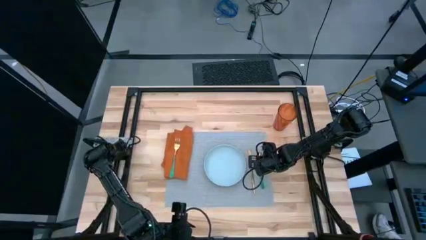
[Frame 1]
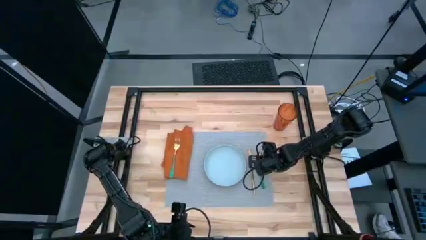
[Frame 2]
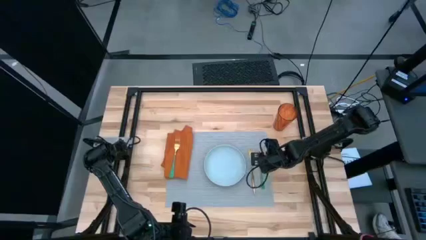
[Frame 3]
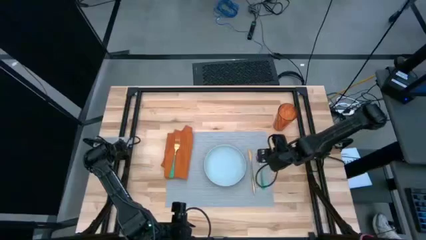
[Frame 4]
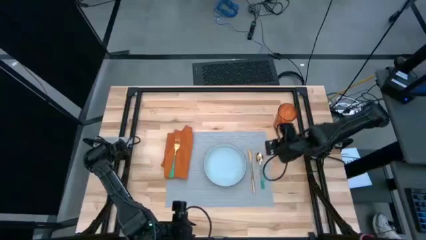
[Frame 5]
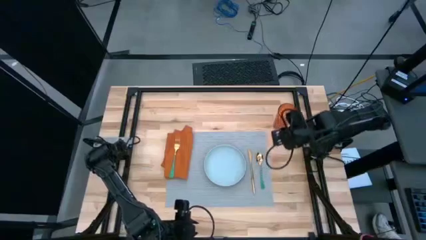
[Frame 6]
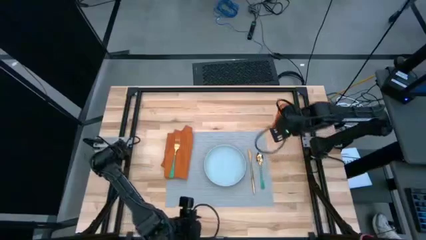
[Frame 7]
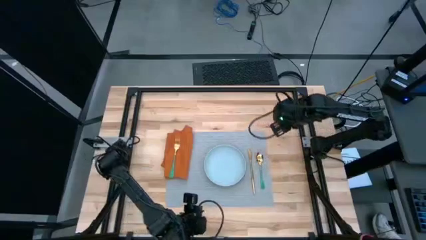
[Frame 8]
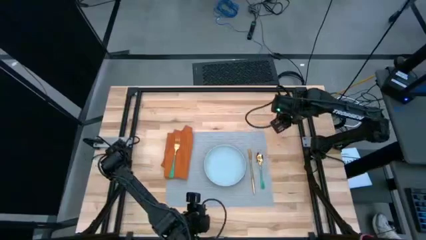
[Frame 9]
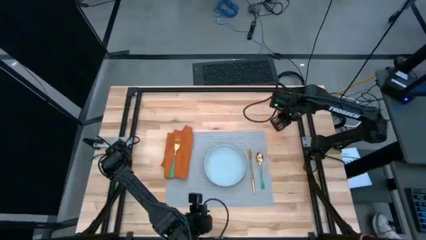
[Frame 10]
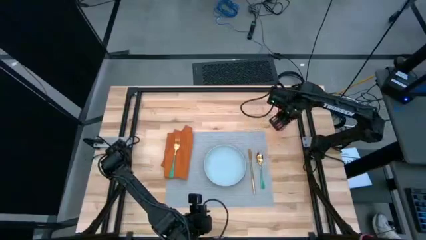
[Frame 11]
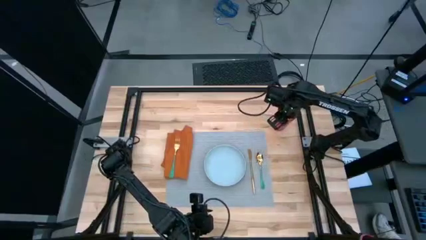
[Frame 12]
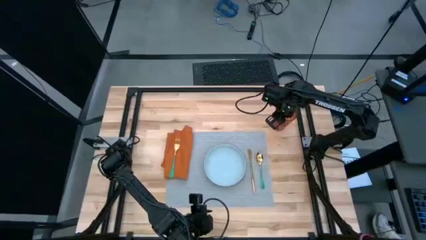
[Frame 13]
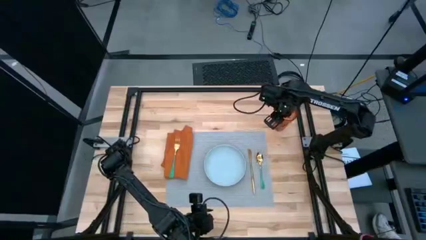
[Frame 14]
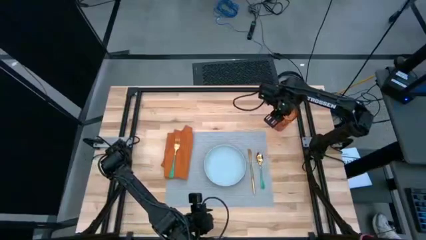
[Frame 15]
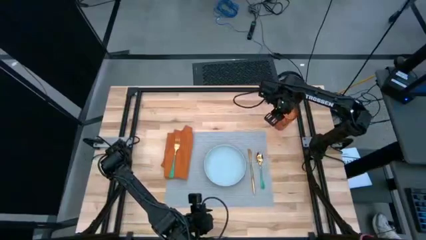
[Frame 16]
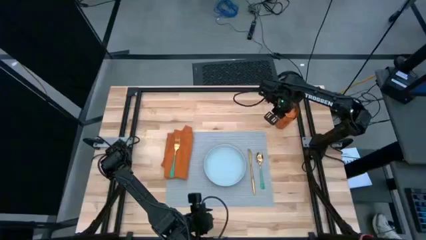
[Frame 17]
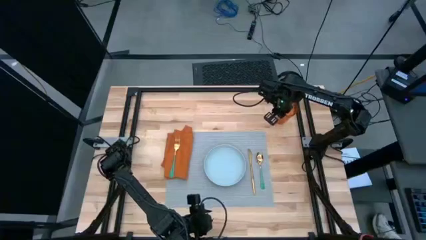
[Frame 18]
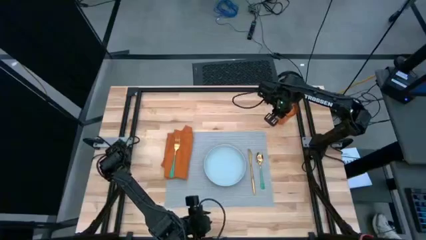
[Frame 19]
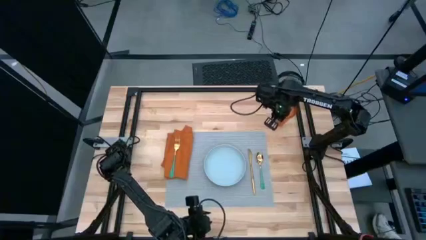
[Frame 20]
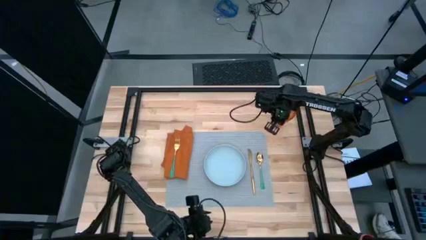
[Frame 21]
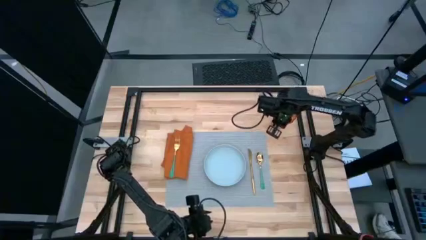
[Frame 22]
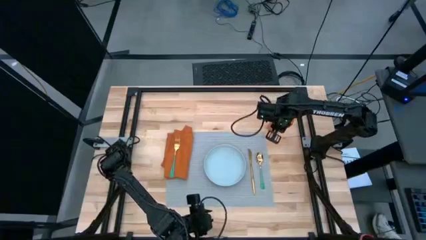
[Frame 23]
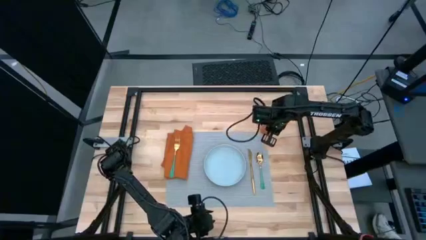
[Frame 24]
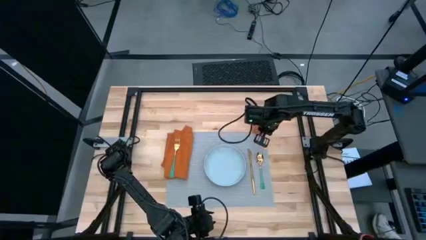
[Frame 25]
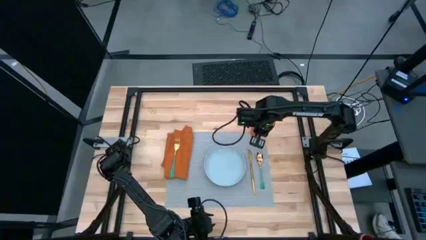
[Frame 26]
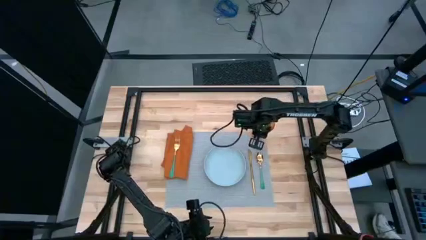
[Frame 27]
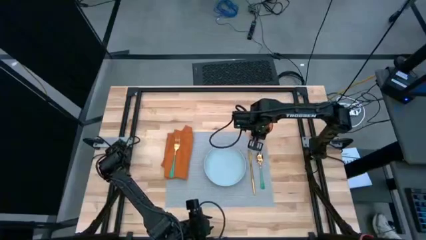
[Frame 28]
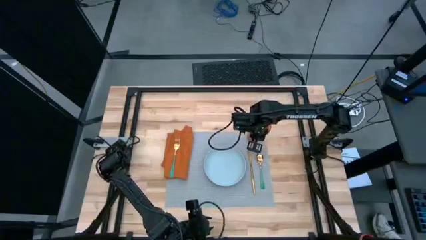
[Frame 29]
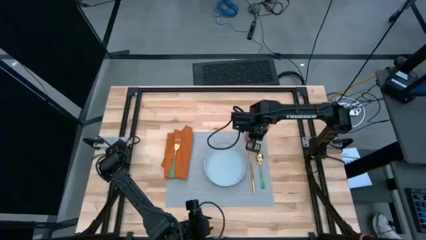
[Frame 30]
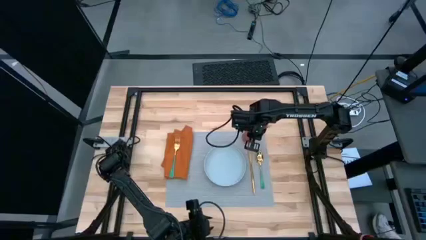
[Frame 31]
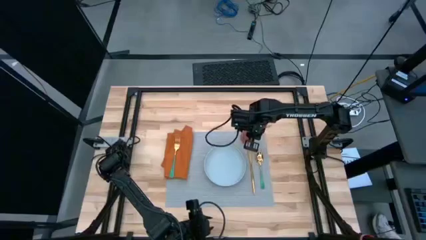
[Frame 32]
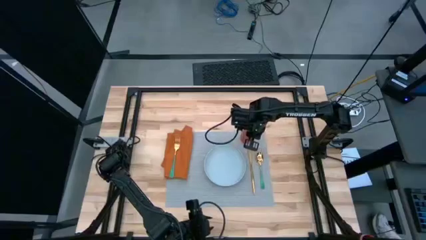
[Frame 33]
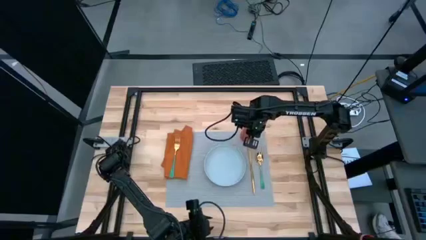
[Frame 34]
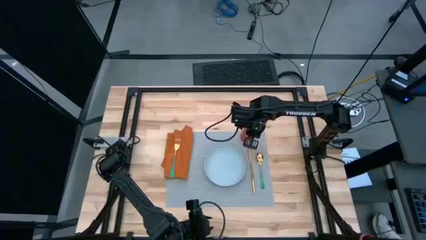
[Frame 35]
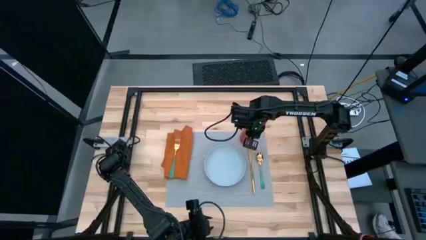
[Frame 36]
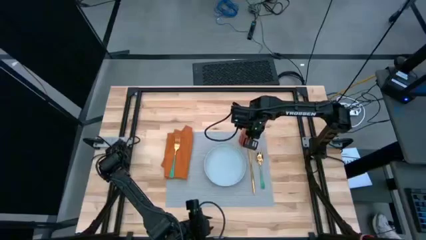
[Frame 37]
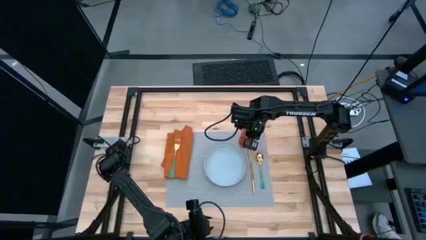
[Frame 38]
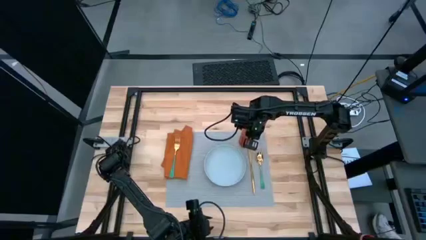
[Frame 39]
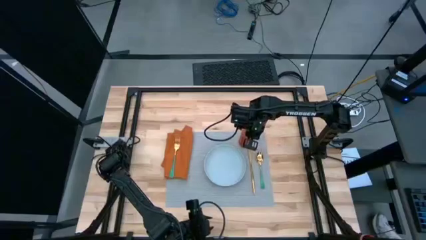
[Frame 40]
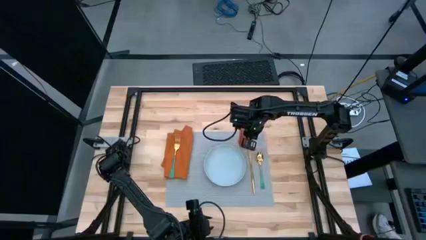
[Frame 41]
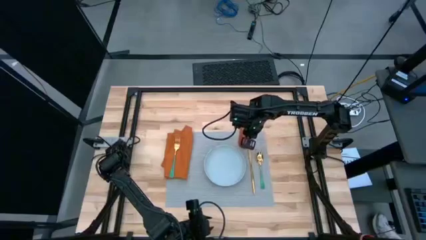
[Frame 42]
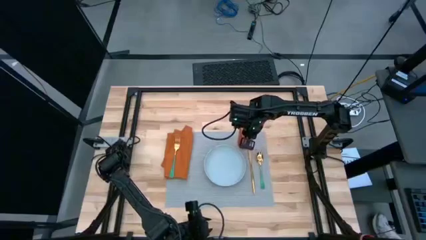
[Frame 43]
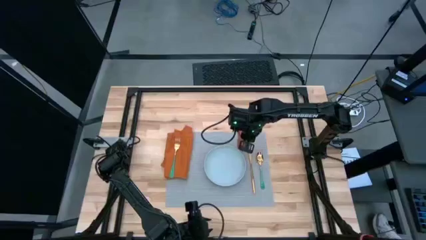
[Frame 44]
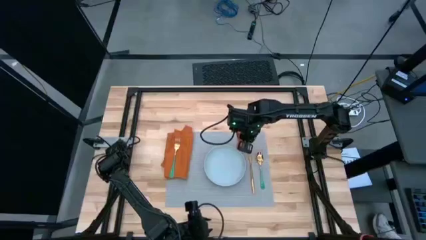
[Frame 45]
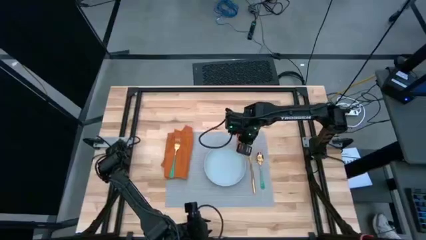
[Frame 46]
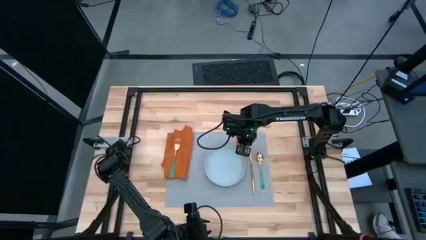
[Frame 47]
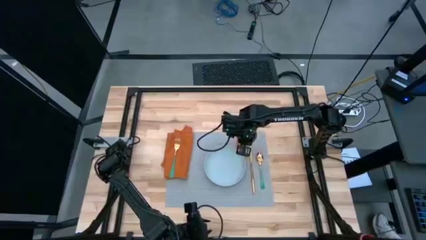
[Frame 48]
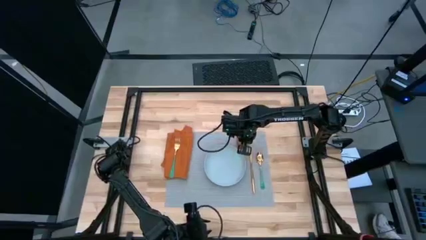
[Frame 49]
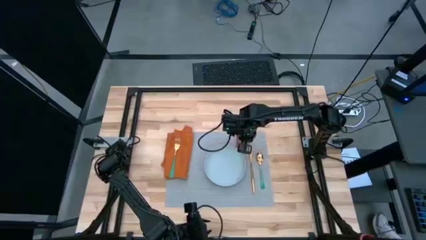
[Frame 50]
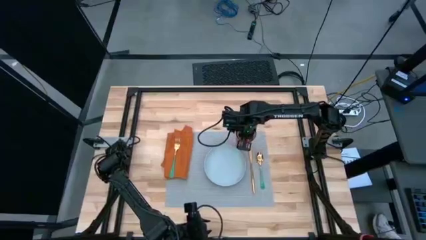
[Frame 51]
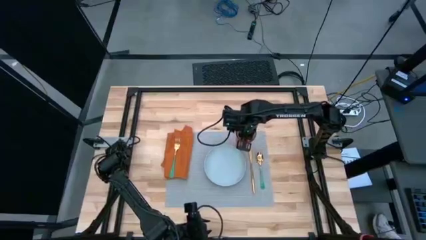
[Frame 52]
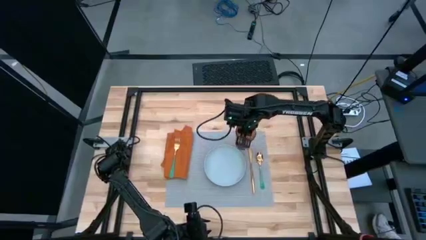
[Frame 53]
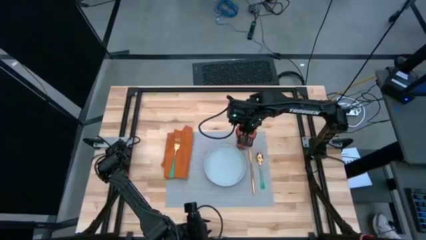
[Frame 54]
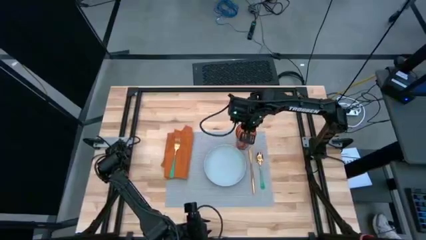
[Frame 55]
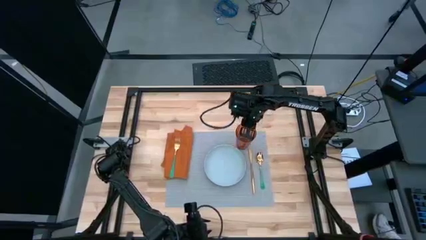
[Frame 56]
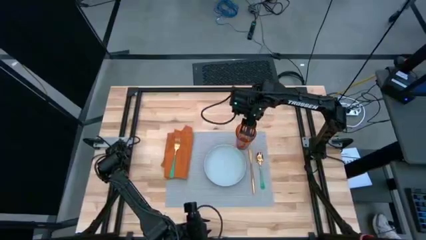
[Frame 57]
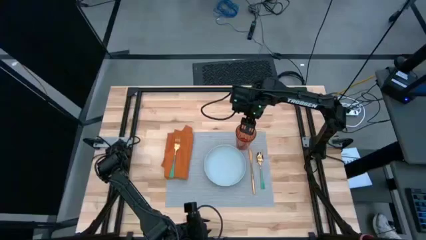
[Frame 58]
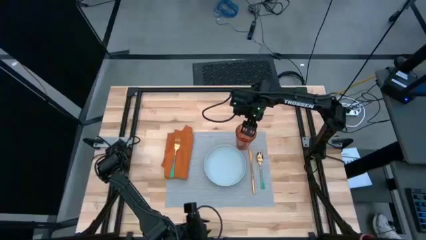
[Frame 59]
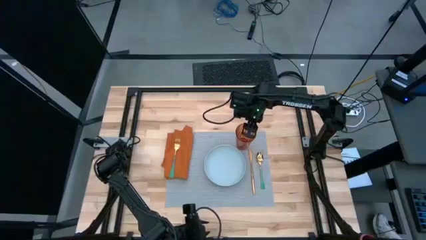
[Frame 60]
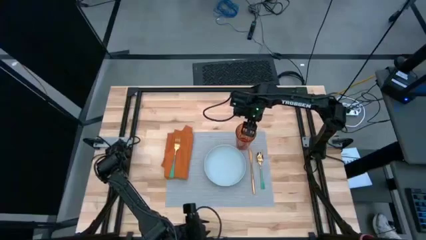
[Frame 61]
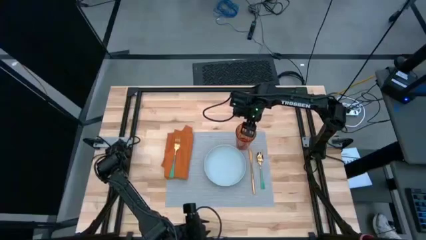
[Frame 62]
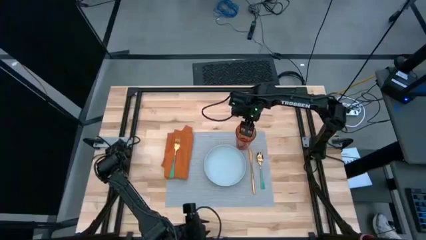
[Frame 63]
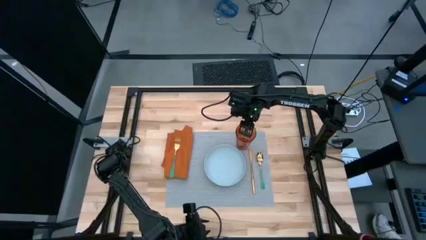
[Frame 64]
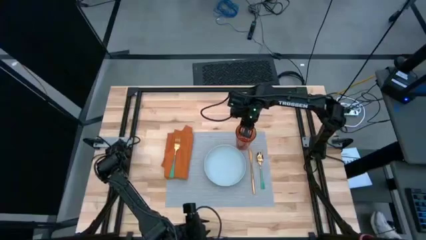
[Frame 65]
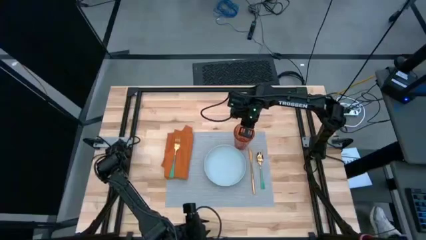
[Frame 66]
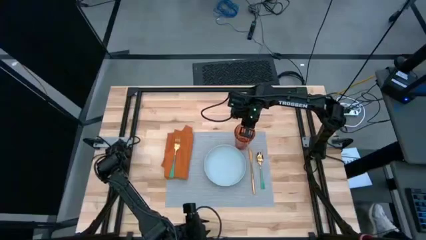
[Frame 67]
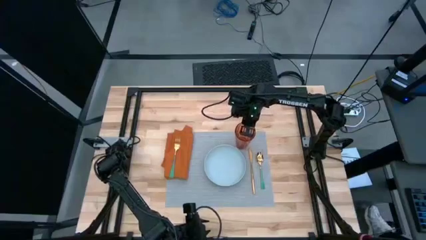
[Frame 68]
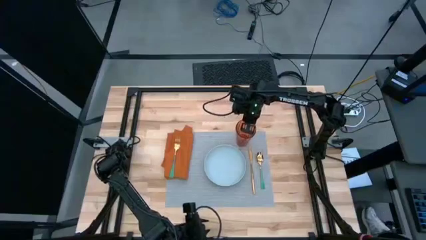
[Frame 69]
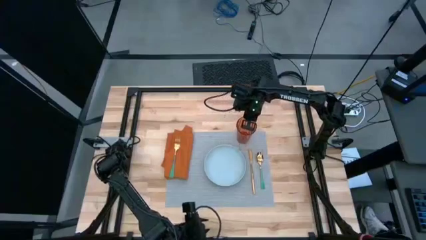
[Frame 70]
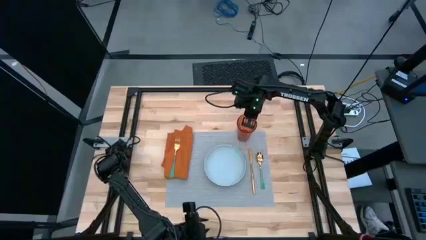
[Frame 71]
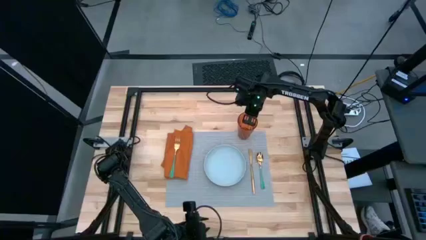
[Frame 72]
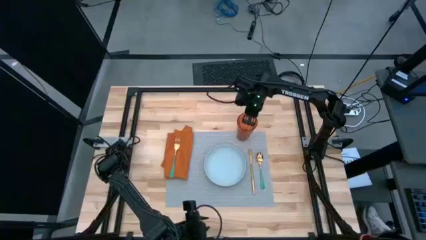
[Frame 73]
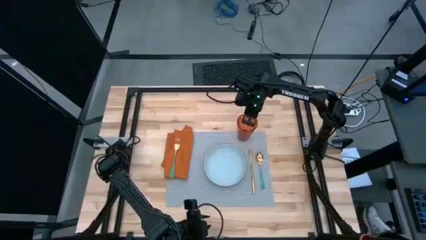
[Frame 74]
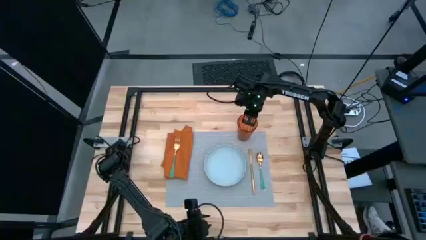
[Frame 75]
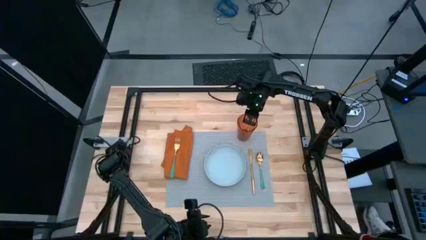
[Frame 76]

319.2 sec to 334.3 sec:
Task: Set table place
Put the orange cup on the gray table mat to the top right of the blue plate

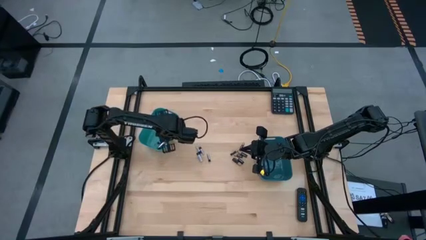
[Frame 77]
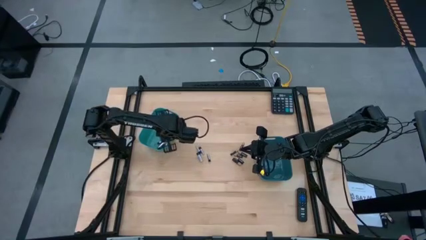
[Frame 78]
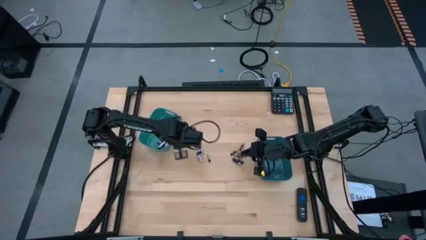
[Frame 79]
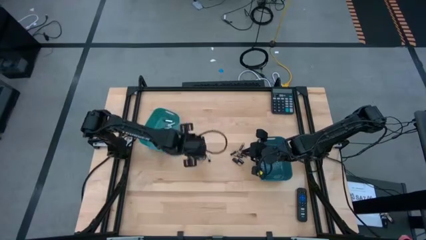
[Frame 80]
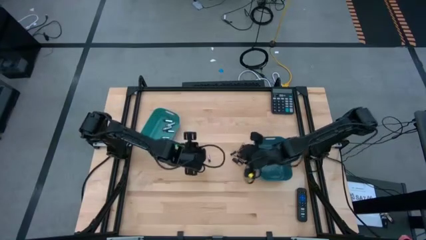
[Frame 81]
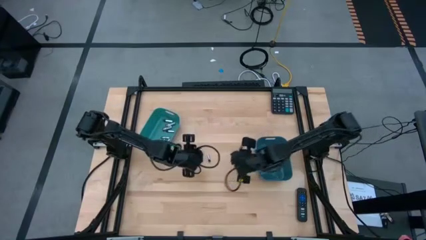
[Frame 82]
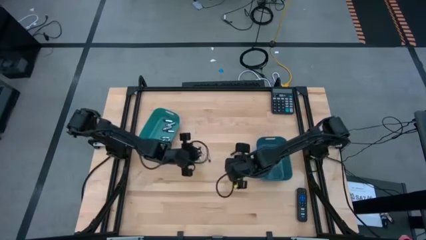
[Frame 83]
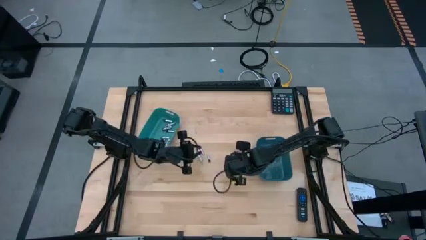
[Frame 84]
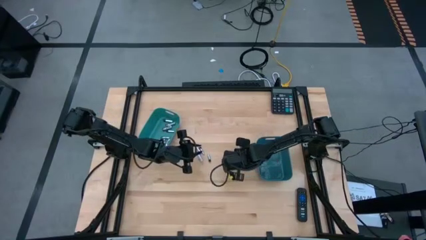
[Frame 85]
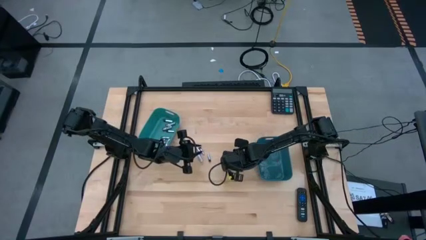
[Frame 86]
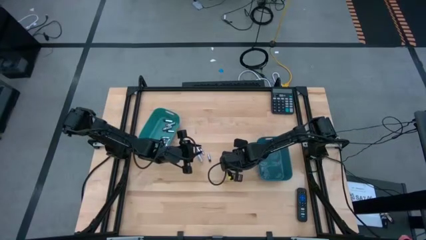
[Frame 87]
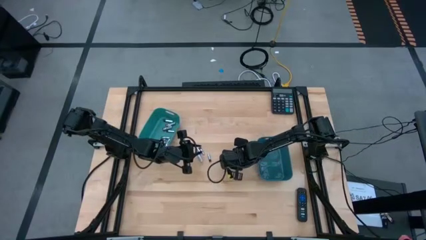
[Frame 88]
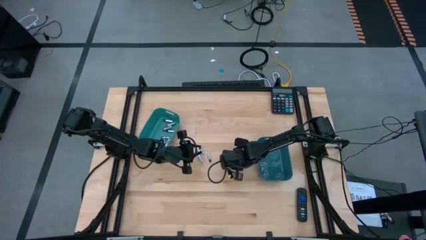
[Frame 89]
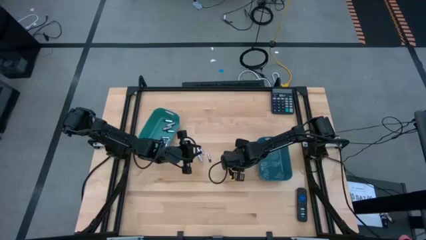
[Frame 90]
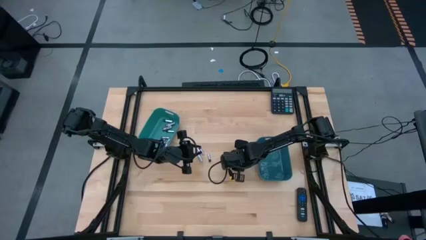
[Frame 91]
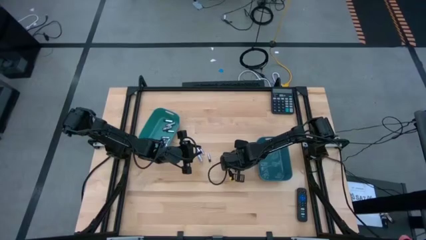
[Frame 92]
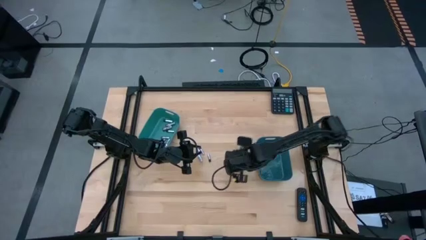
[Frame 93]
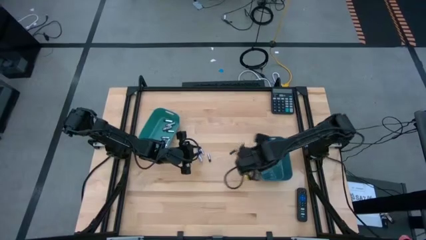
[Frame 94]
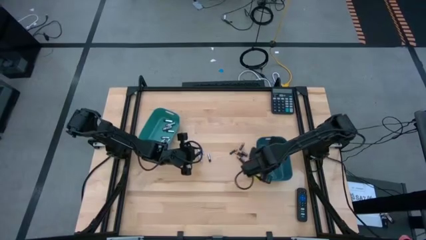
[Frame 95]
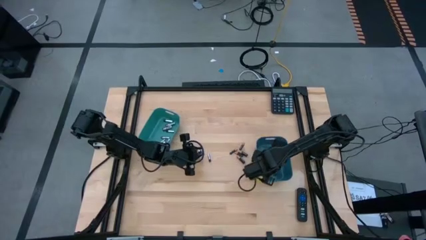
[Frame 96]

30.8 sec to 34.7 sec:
Task: Sort batteries
Put the black battery into the blue bin
